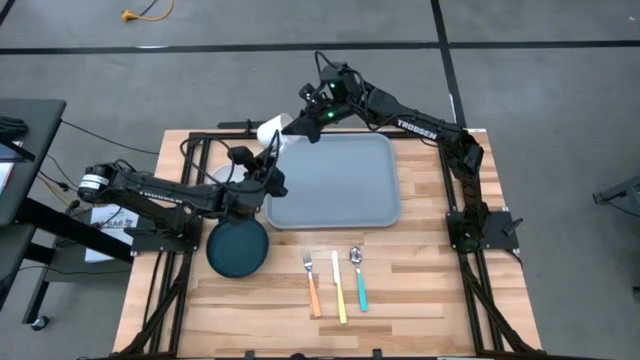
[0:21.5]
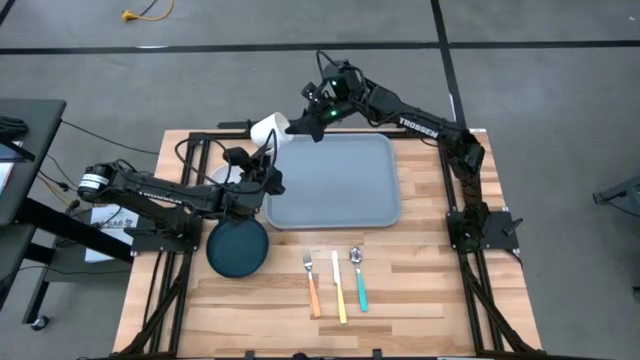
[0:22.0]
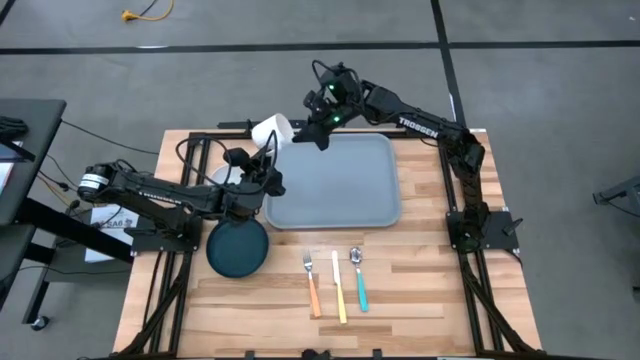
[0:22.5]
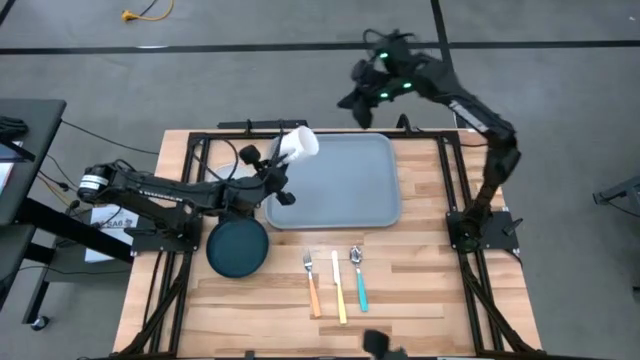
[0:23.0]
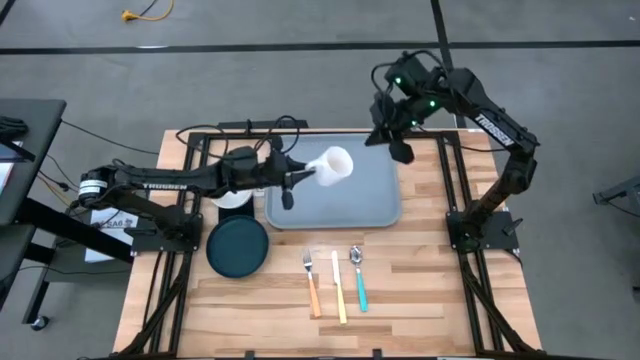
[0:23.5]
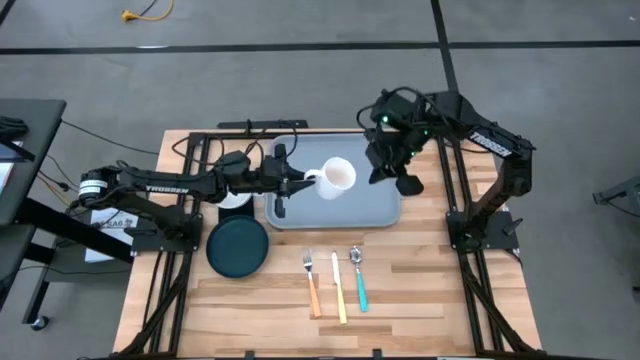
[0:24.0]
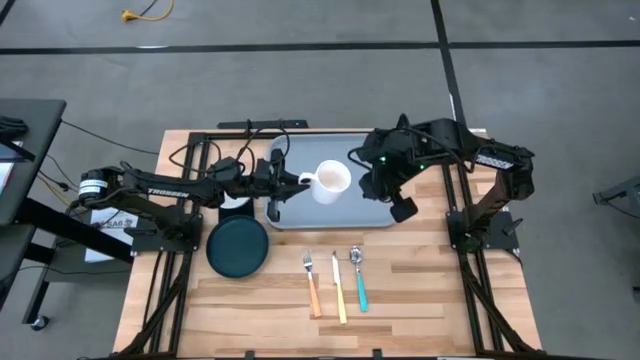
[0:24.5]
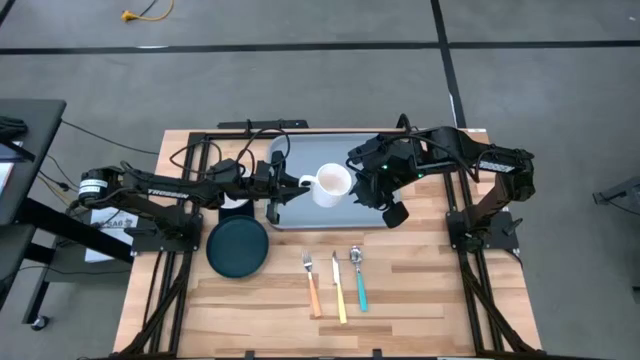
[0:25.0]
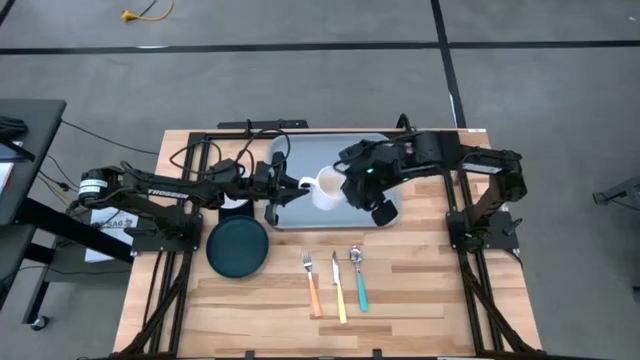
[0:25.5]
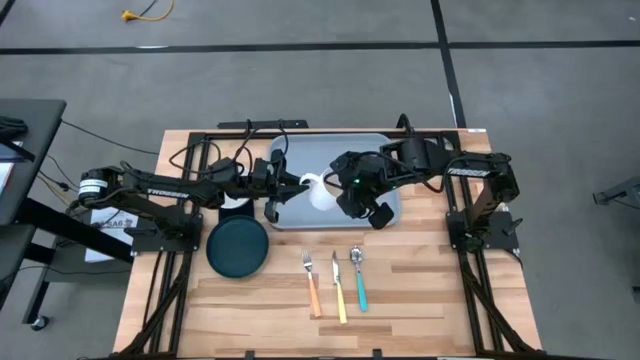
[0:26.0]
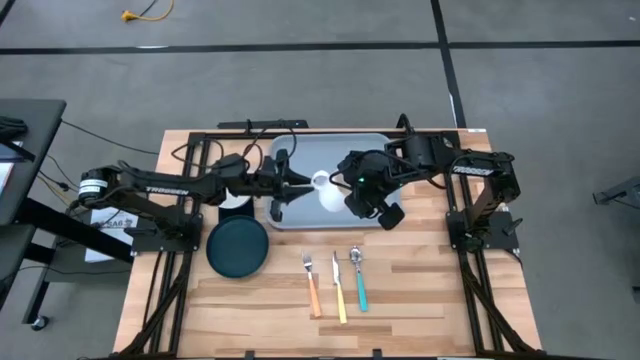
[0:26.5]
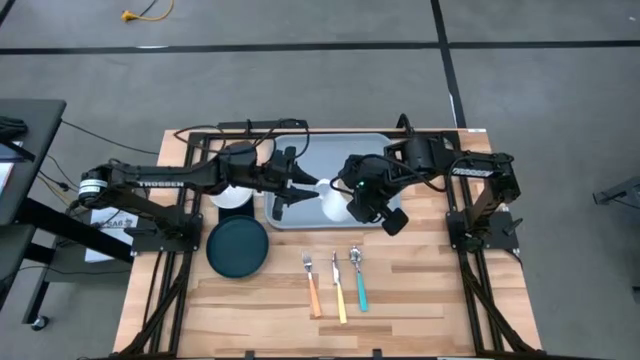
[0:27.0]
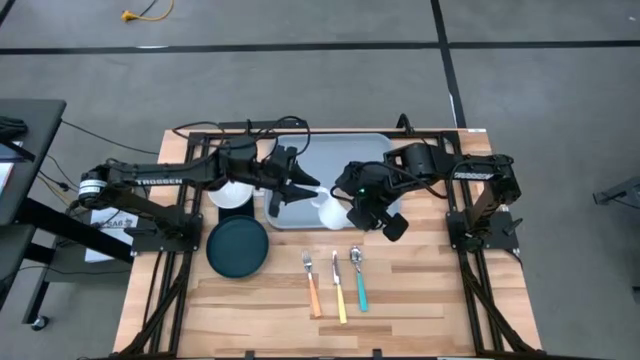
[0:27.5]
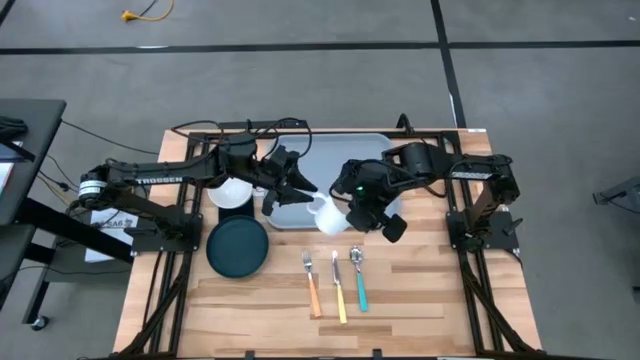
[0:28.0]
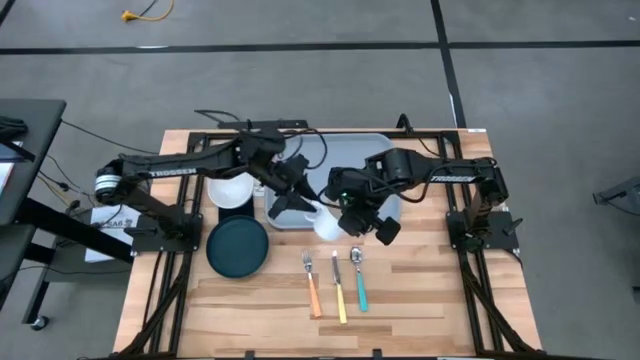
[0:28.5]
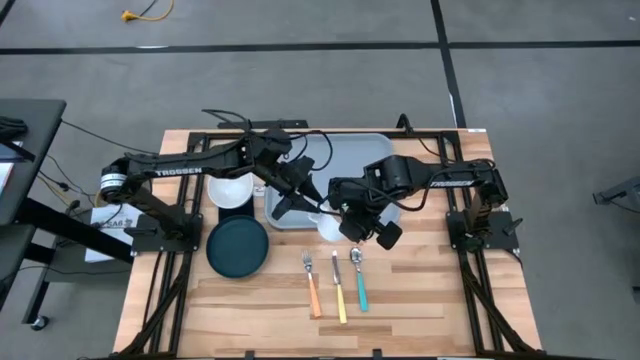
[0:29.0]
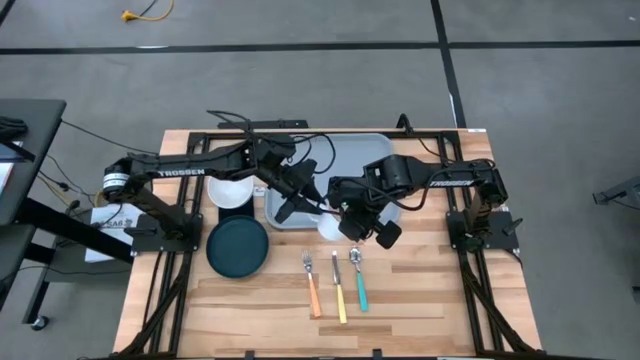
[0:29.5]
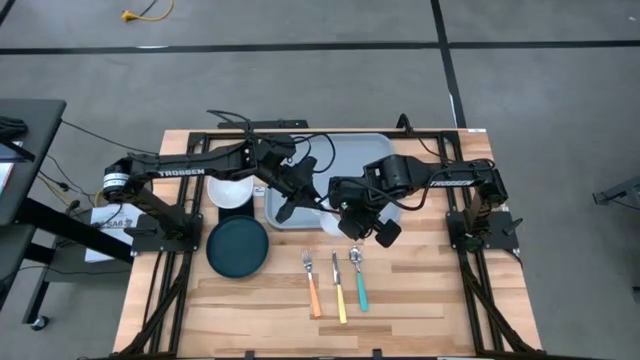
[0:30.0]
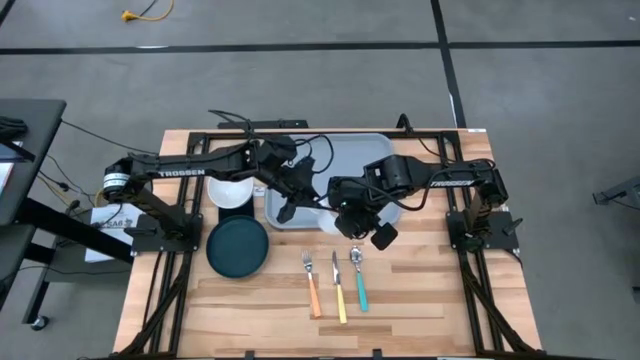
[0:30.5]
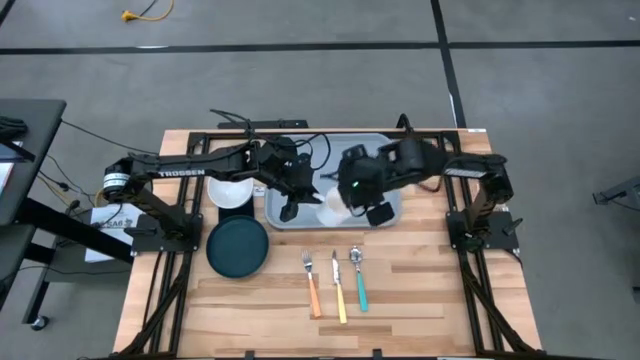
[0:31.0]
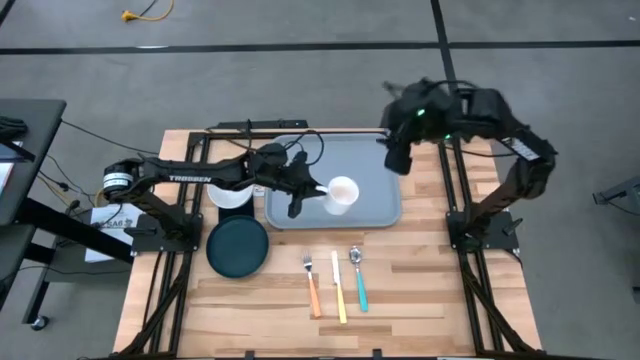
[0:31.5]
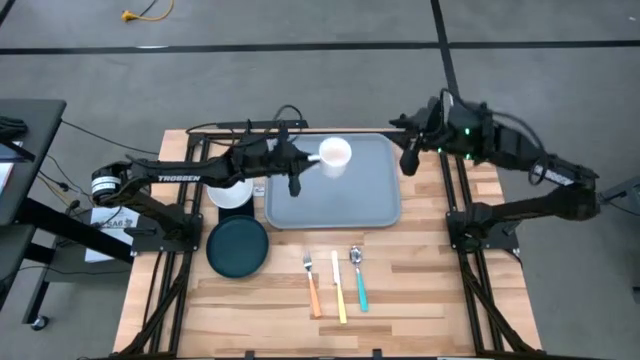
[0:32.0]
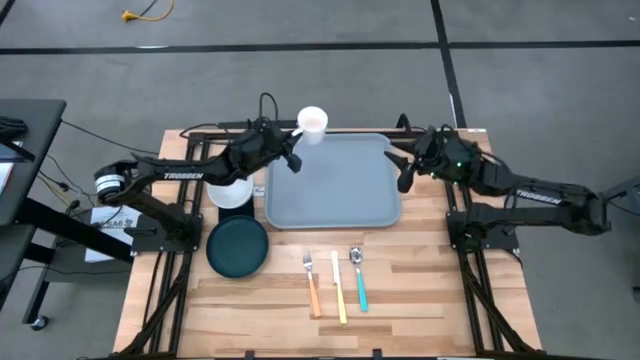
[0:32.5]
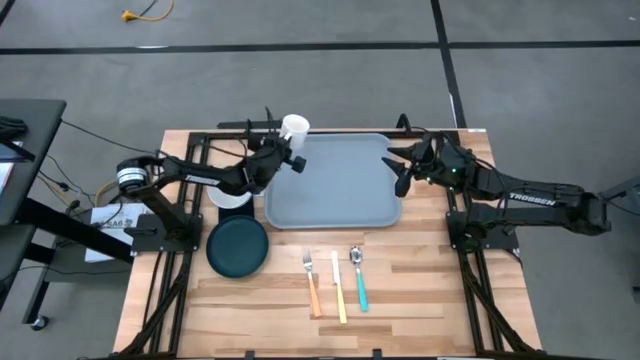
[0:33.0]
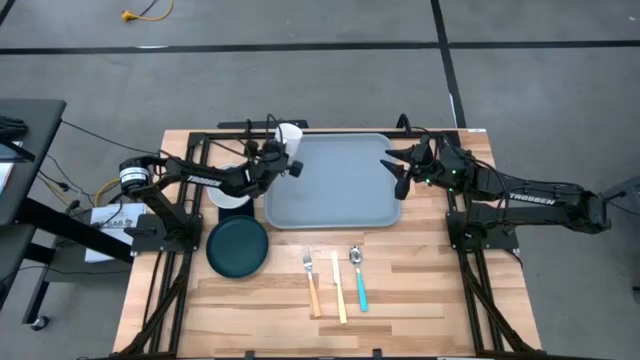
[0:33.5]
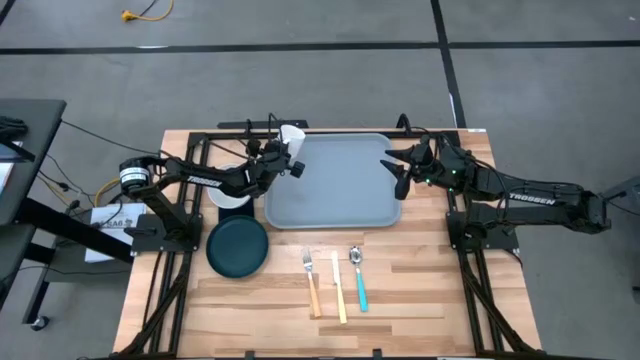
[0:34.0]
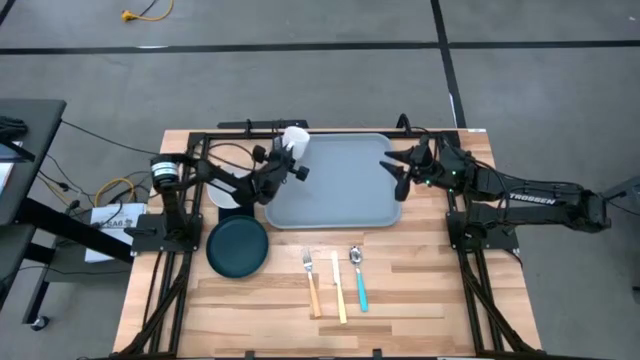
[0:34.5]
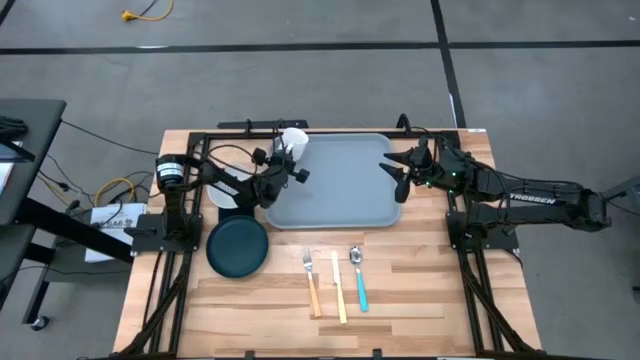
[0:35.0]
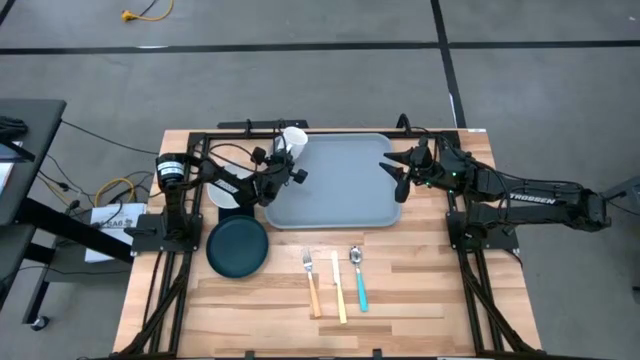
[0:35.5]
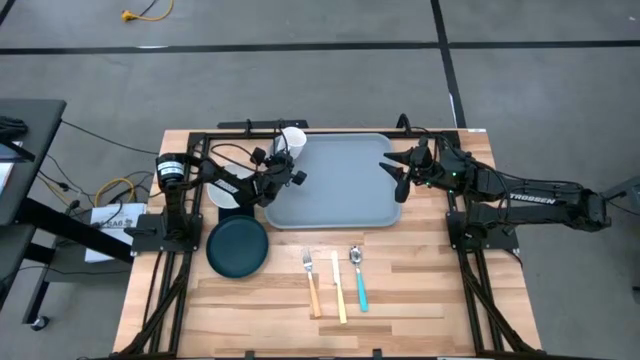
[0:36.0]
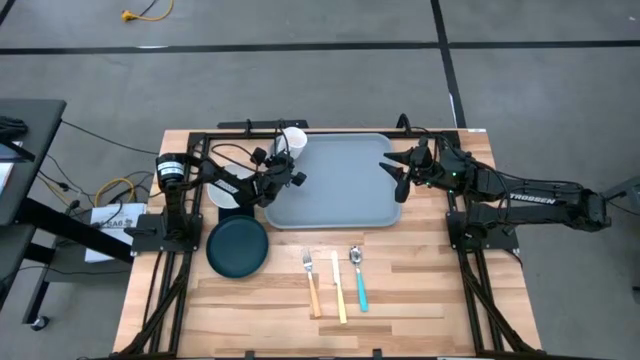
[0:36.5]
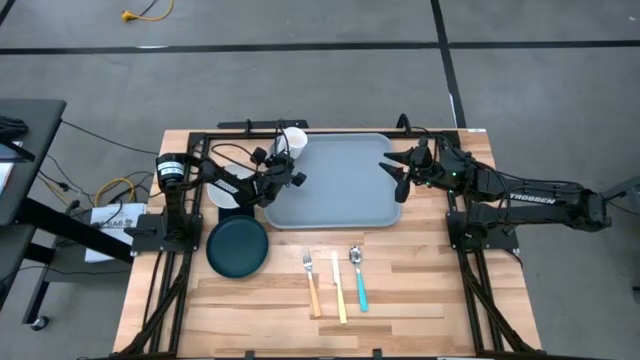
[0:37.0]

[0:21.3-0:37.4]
Task: Set up tray
Put the white mug on the top left of the blue tray

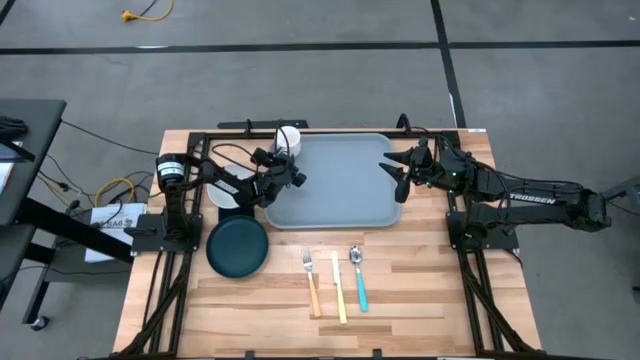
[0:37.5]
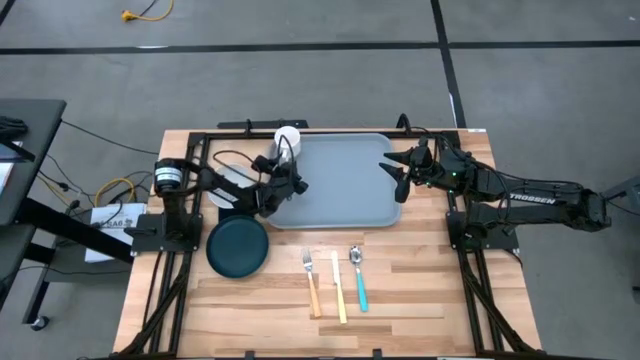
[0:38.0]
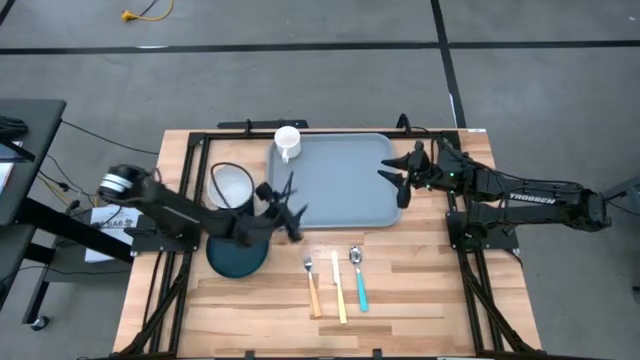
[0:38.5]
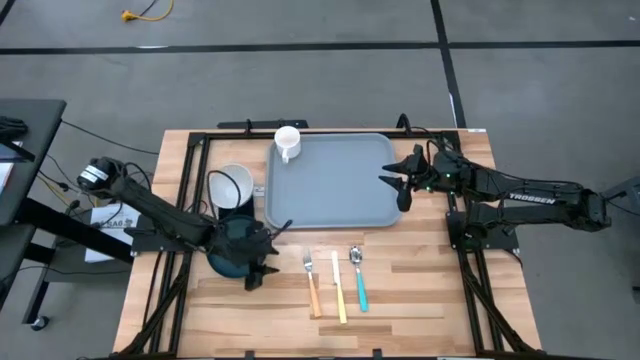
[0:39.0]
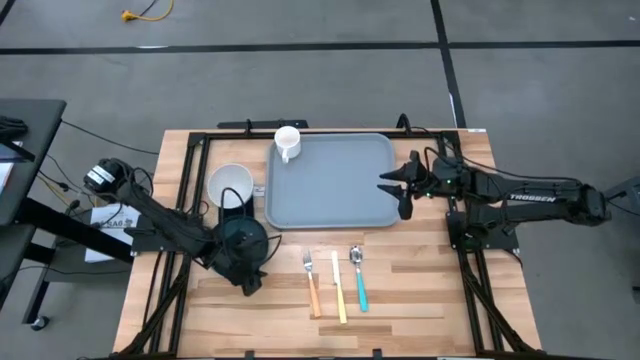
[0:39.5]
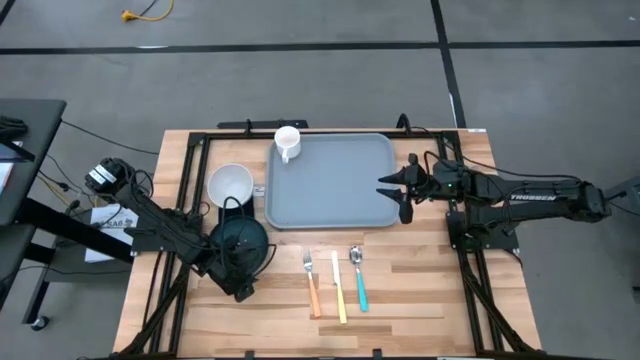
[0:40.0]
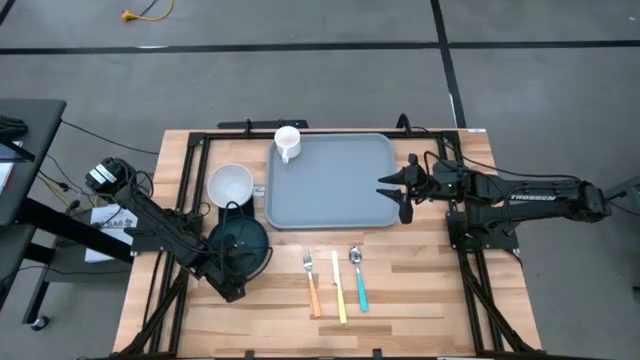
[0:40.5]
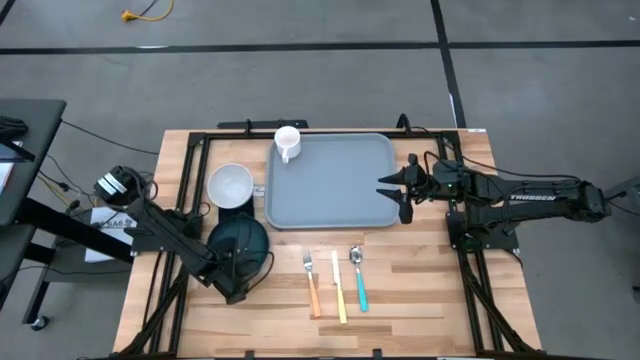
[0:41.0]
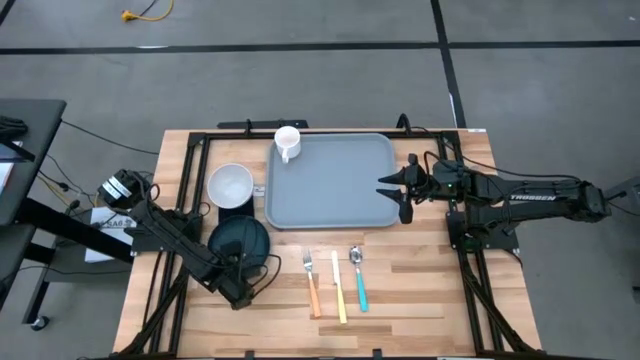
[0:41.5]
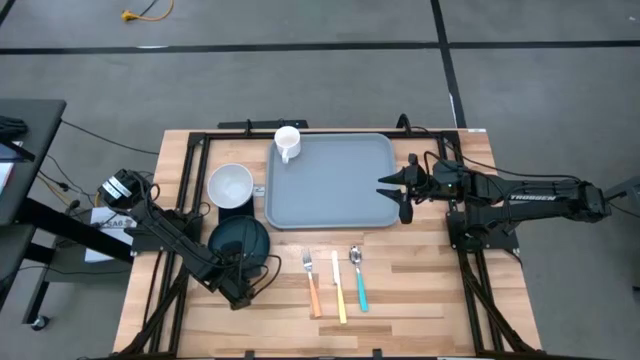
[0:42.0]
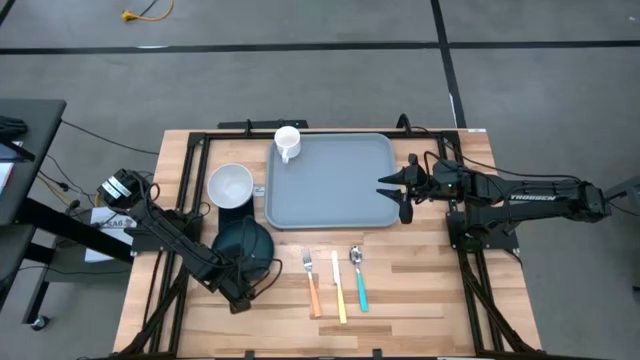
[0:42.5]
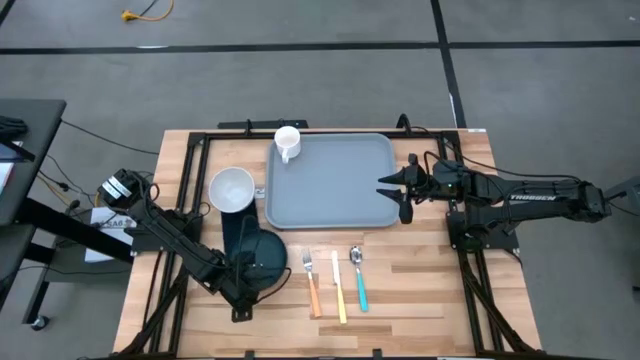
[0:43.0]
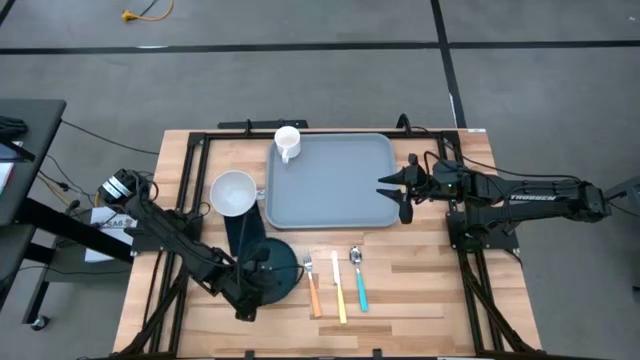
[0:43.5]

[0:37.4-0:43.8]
Put the dark green plate on the tray to the bottom of the white mug
